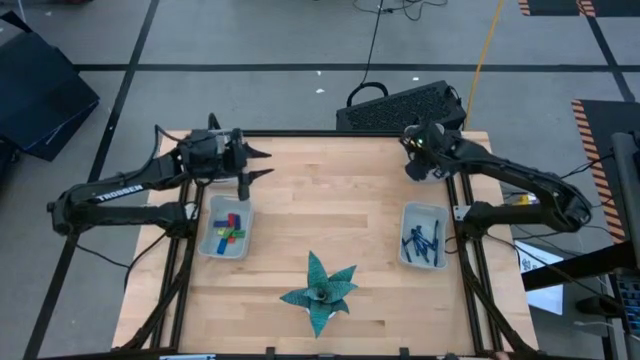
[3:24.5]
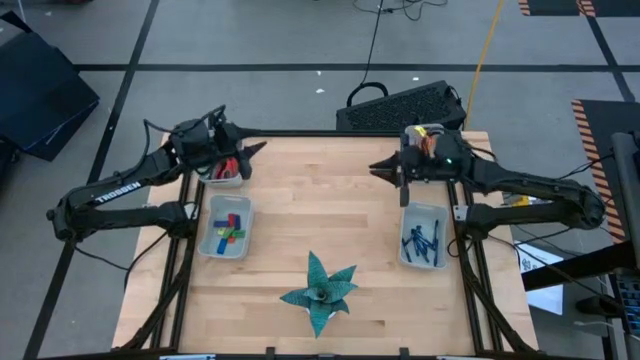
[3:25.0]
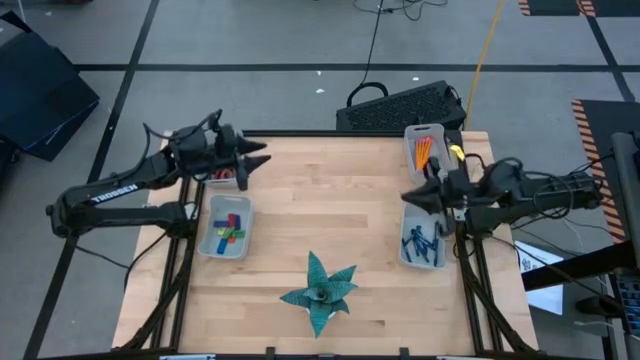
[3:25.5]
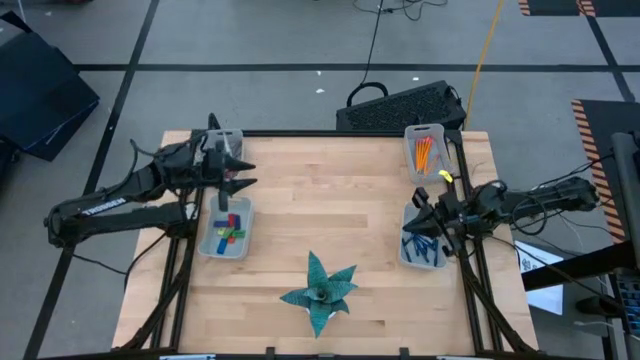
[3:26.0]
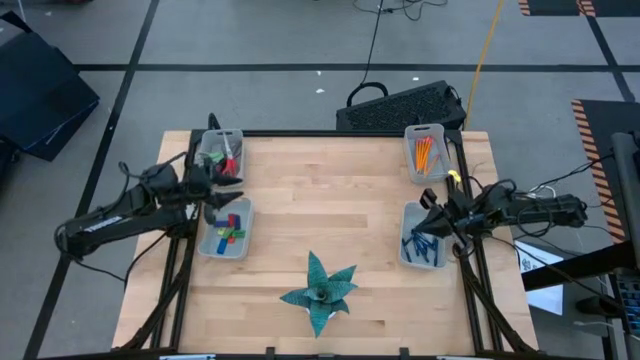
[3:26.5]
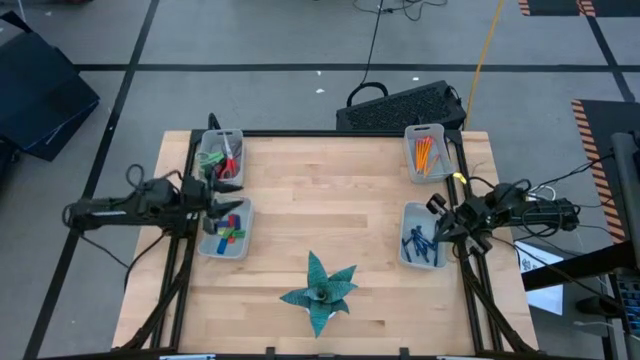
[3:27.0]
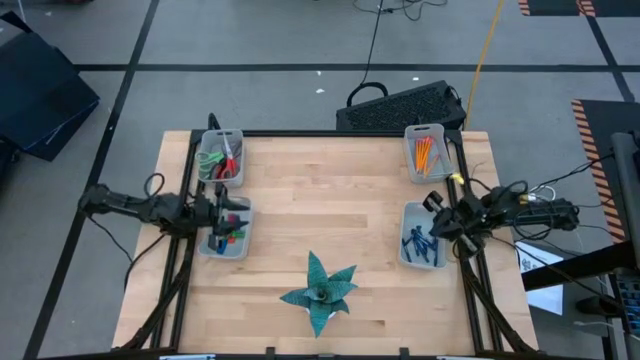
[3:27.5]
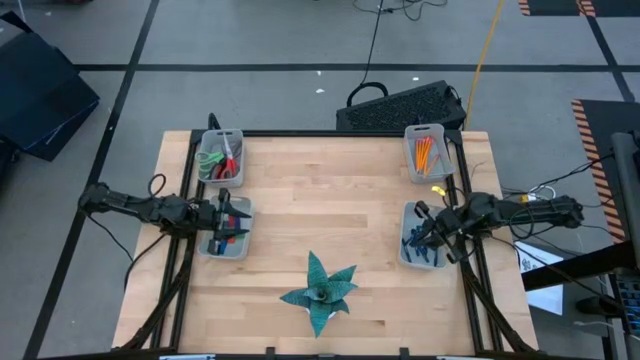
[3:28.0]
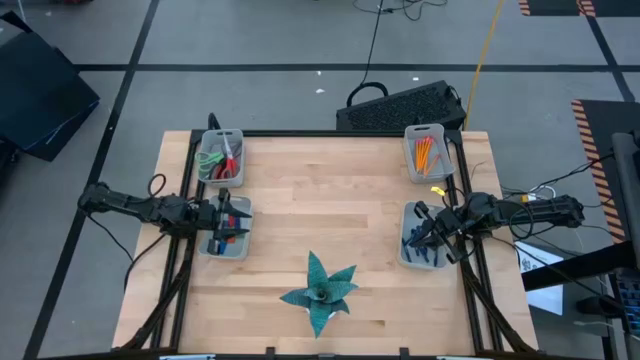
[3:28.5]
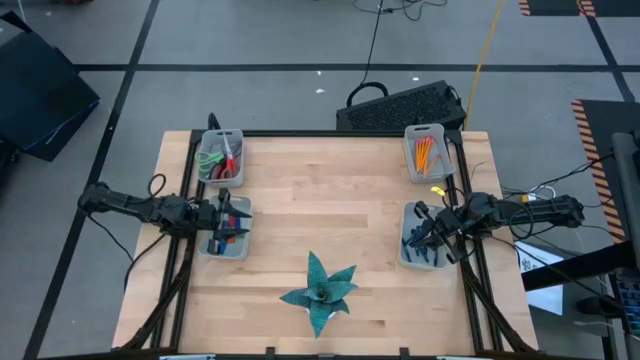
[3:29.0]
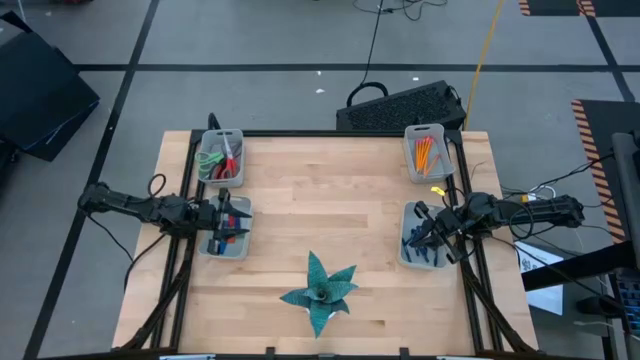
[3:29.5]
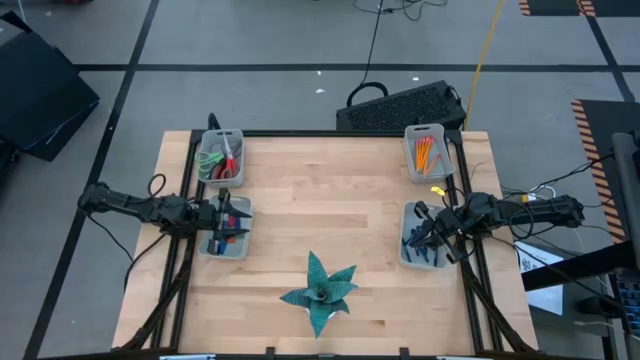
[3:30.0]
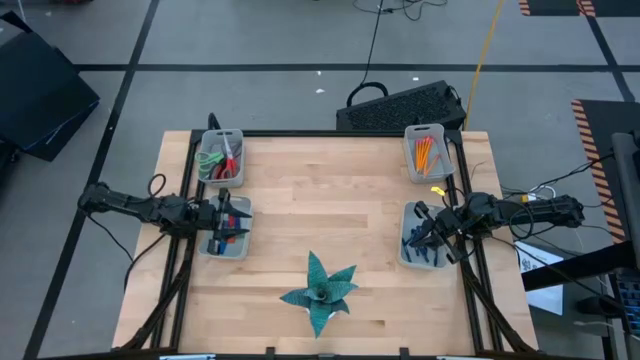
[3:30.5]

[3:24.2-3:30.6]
Task: Sort crayons/erasers/pens/pencils in bins
Return to Home Position

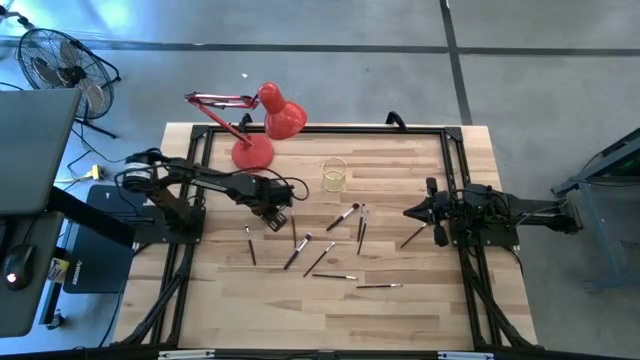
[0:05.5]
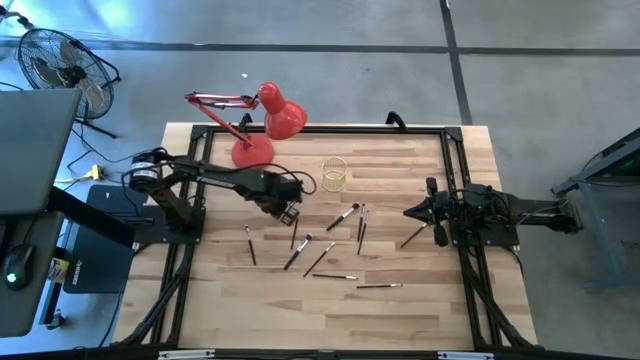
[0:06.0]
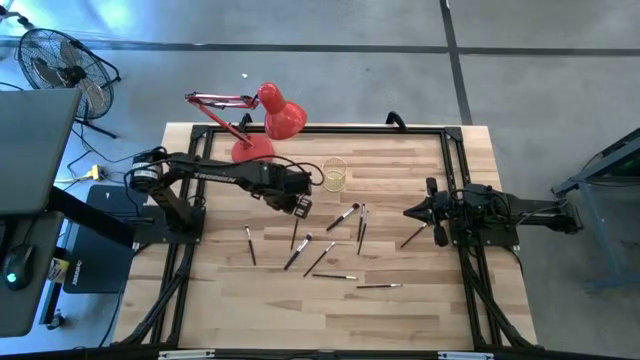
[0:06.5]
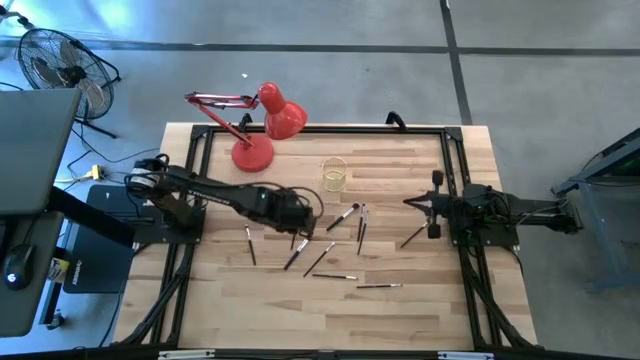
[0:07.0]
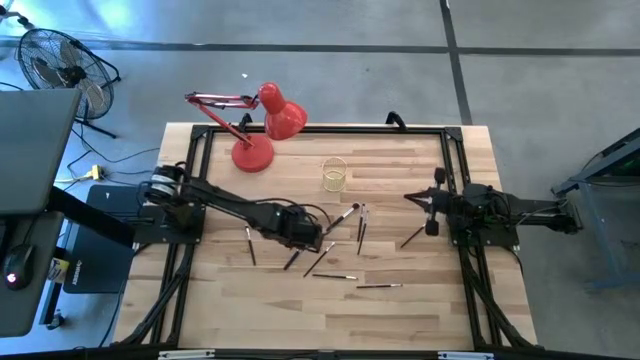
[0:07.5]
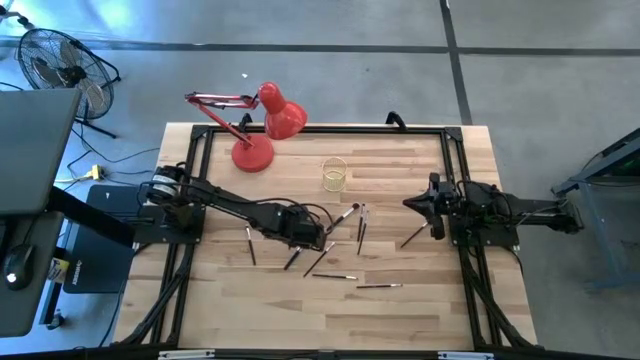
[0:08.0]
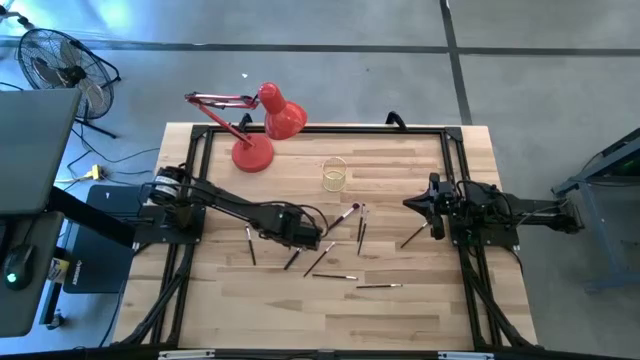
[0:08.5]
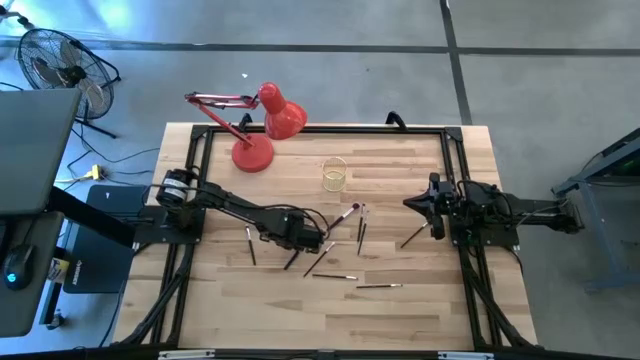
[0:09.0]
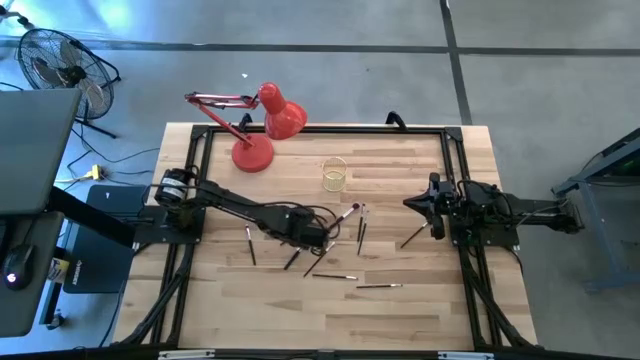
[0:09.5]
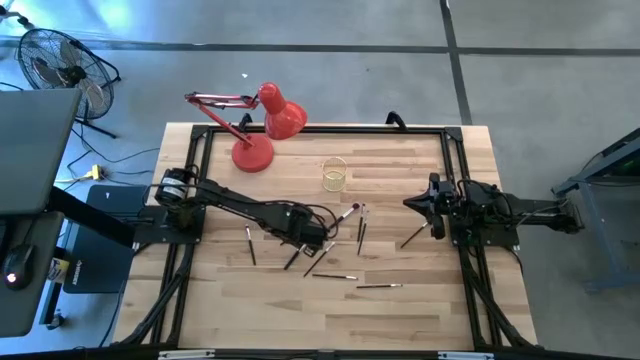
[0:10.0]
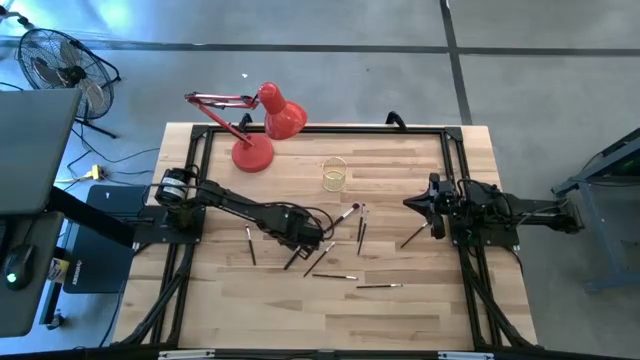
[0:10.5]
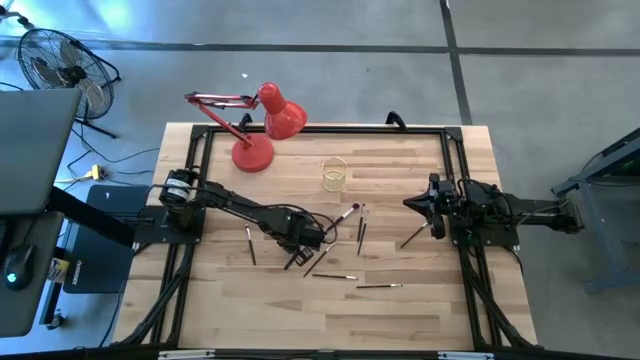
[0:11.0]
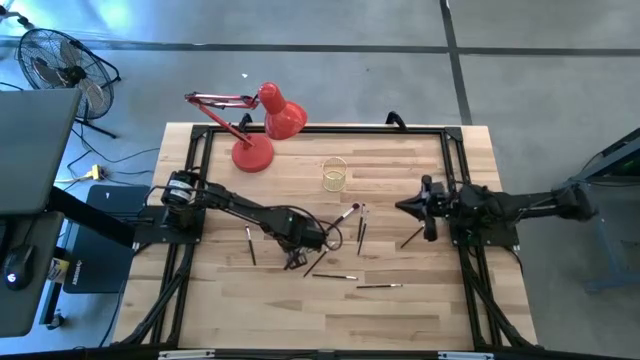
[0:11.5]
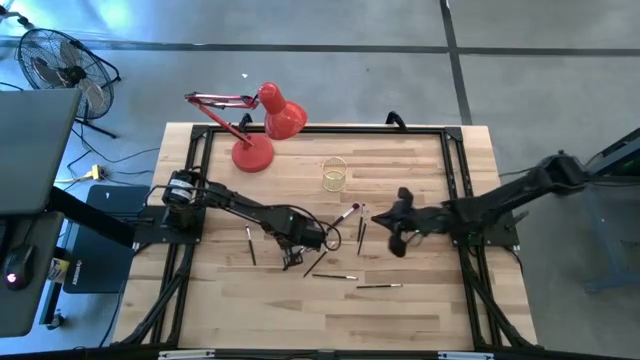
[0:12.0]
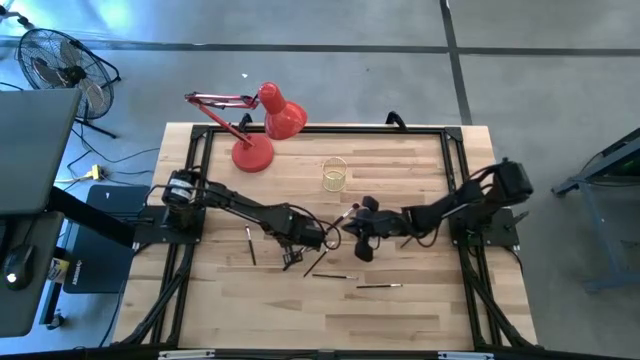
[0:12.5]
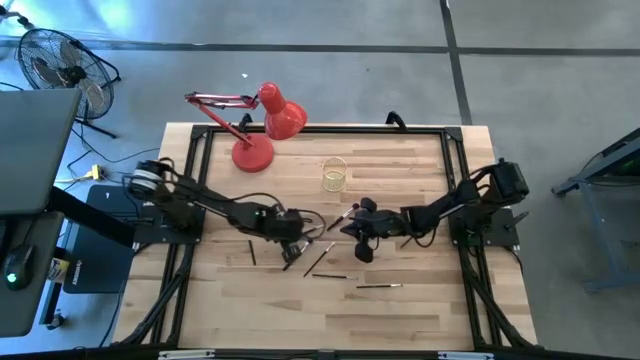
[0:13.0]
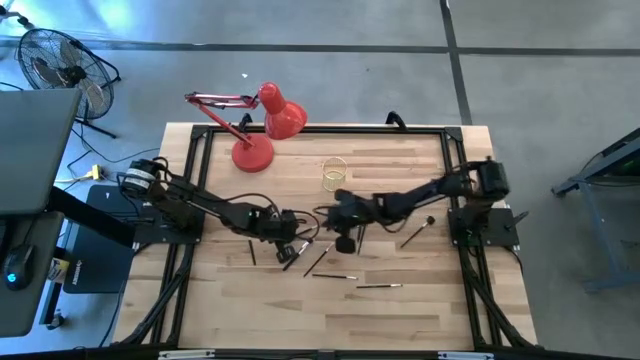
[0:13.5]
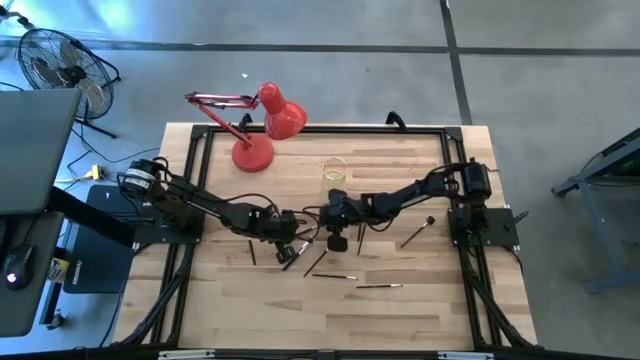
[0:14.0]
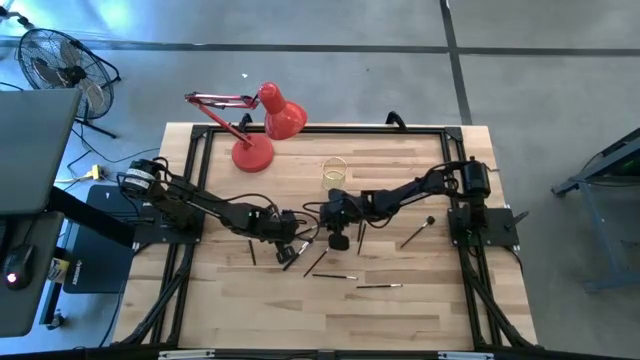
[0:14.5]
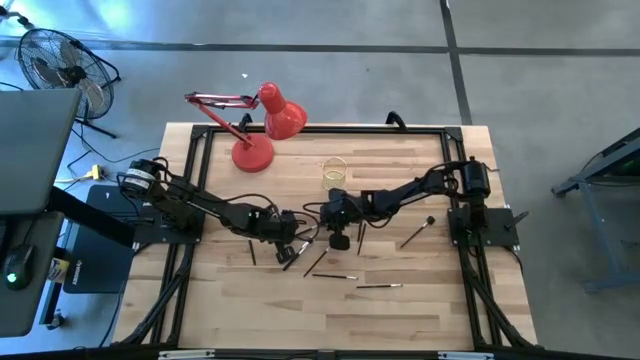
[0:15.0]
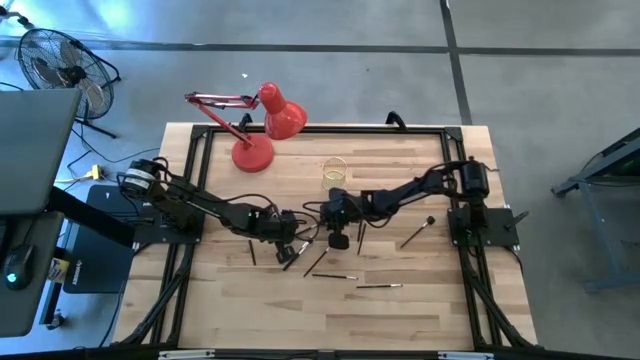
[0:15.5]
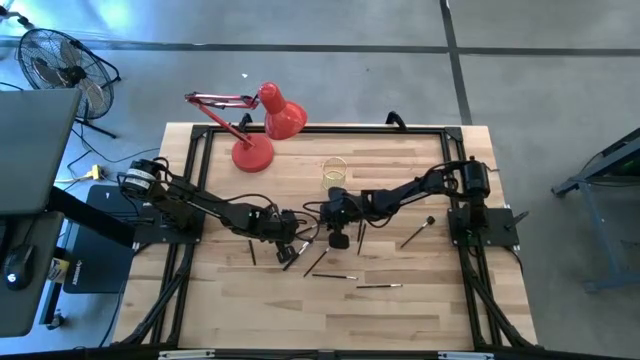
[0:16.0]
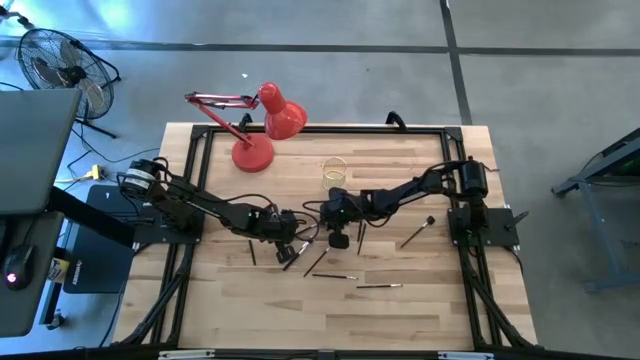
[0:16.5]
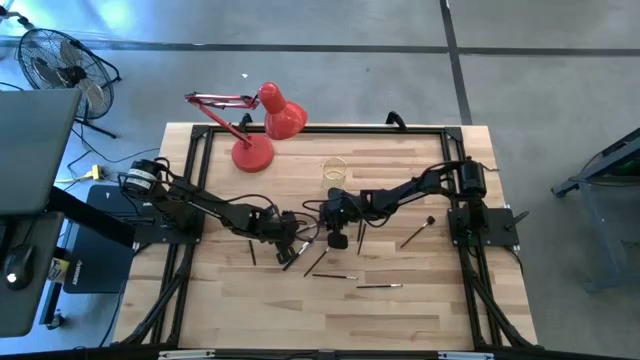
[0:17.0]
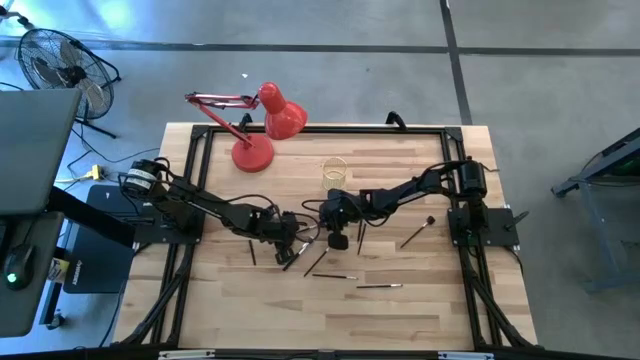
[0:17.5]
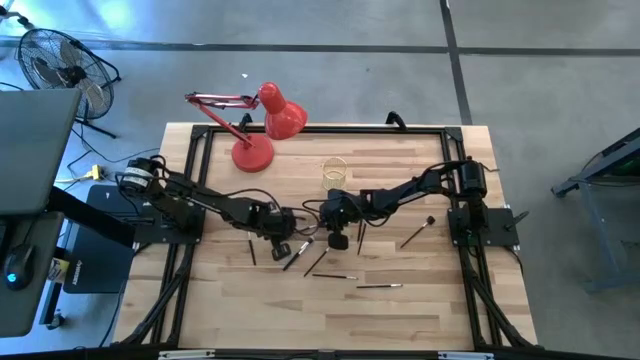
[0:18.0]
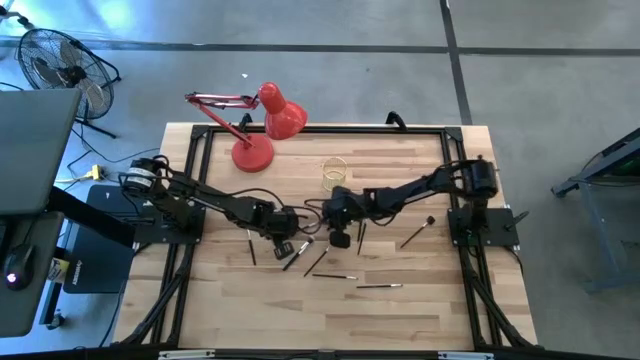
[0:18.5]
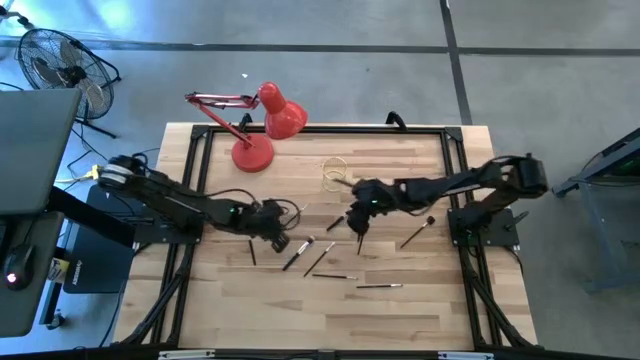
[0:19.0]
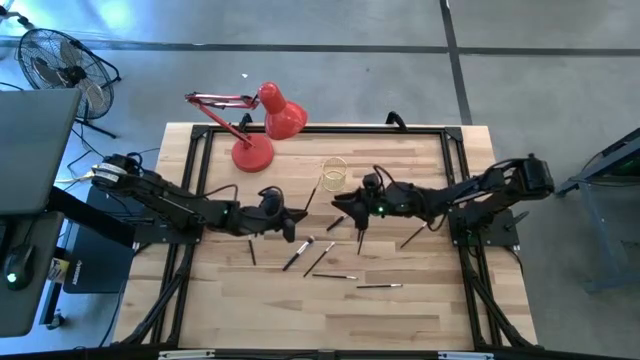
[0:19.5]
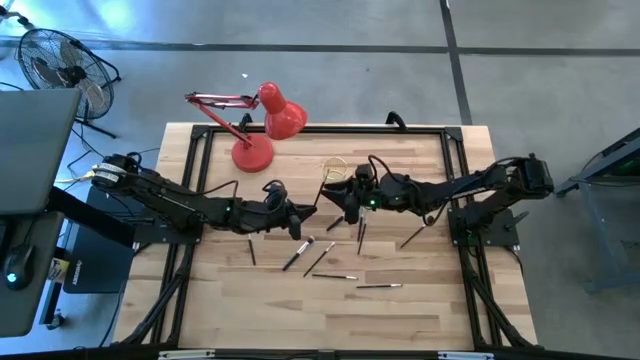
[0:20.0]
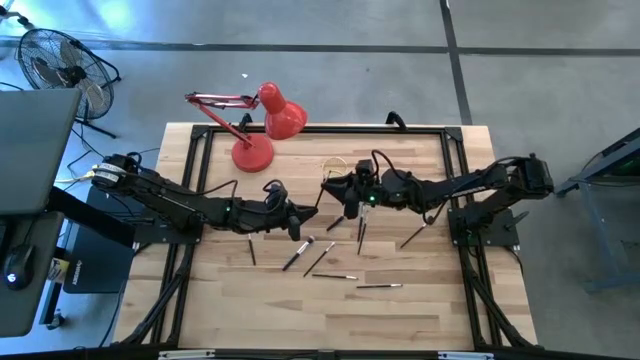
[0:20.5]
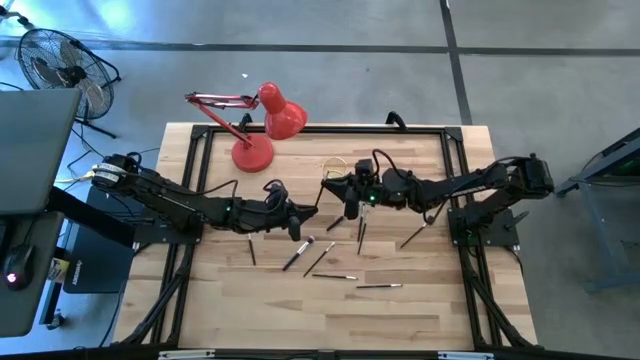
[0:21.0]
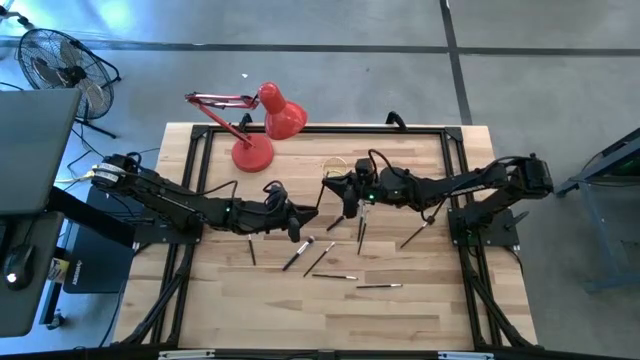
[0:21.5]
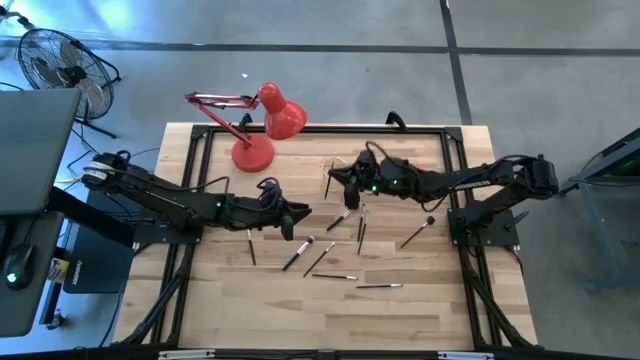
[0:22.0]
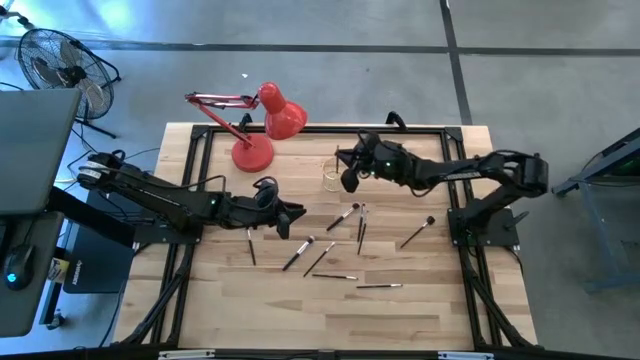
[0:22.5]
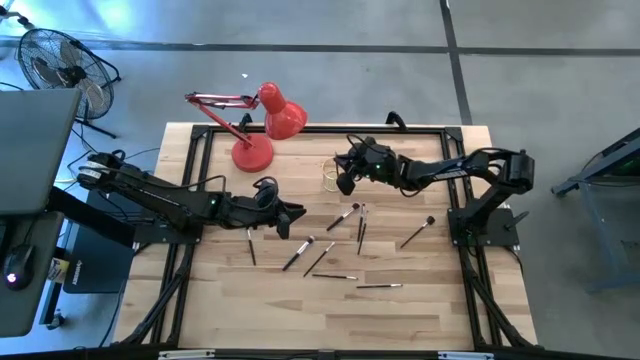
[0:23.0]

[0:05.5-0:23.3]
Task: Put items in baskets/containers
Put the makeup brush into the wire bin
